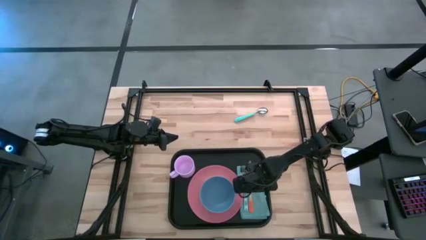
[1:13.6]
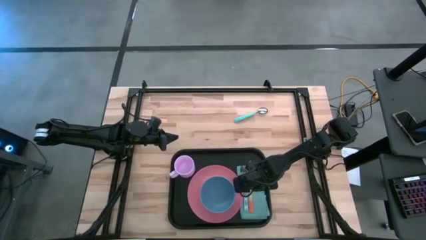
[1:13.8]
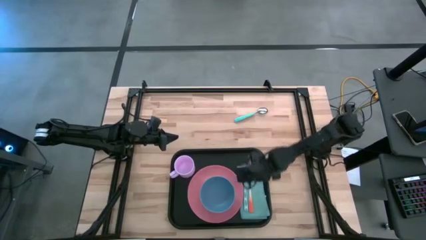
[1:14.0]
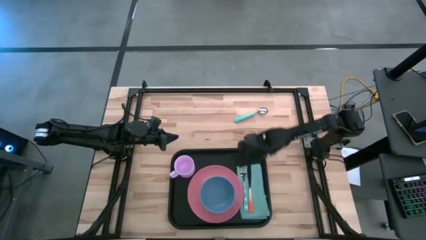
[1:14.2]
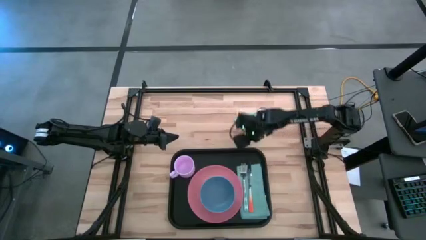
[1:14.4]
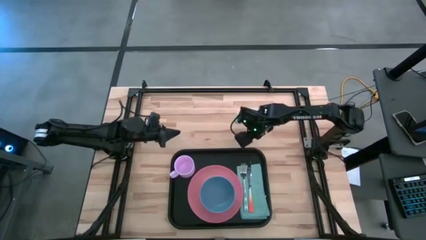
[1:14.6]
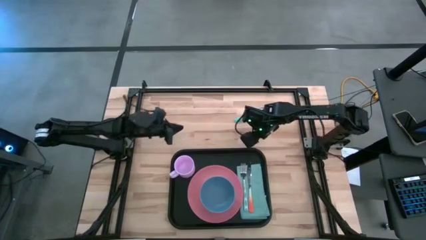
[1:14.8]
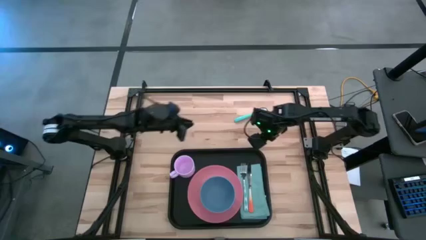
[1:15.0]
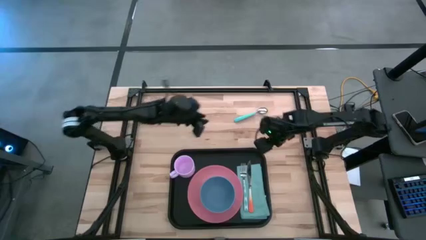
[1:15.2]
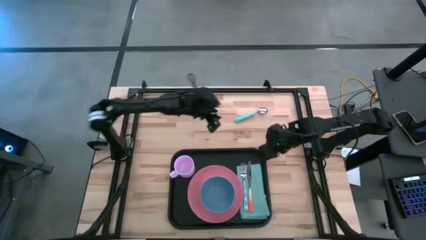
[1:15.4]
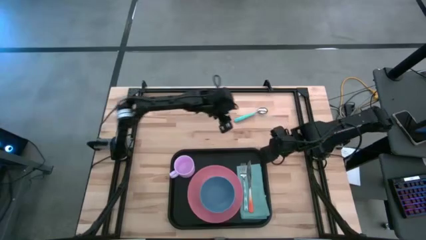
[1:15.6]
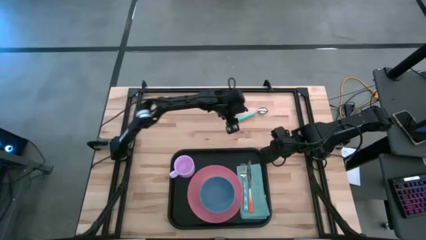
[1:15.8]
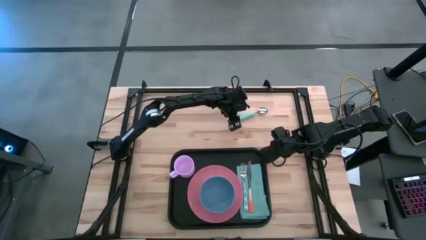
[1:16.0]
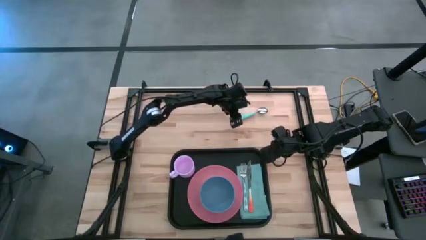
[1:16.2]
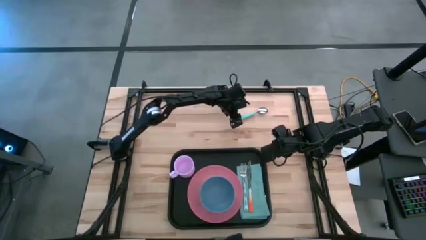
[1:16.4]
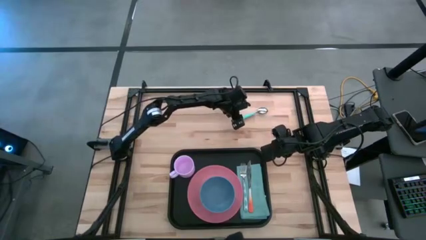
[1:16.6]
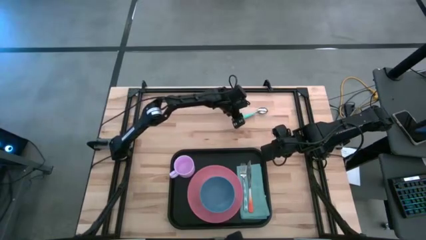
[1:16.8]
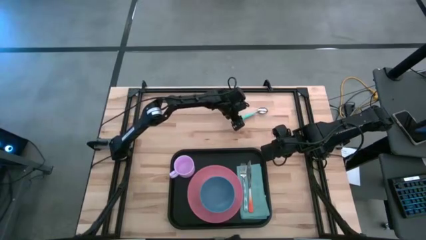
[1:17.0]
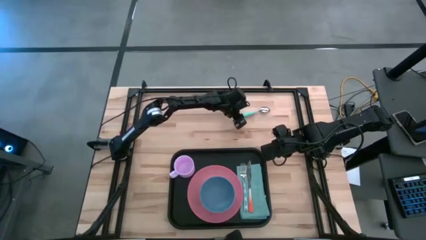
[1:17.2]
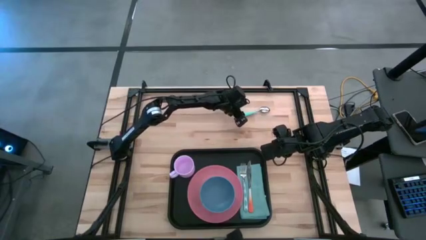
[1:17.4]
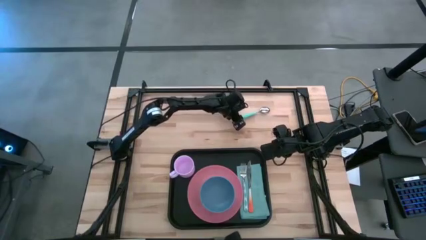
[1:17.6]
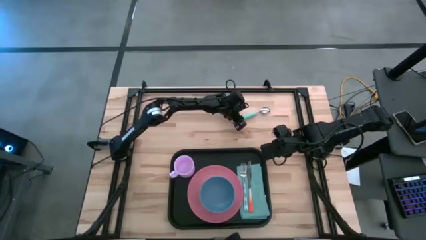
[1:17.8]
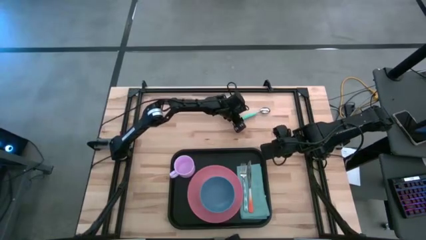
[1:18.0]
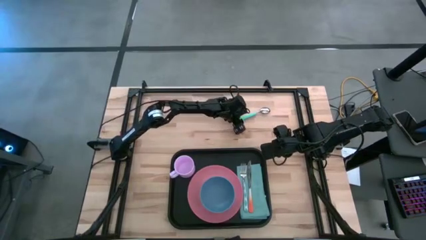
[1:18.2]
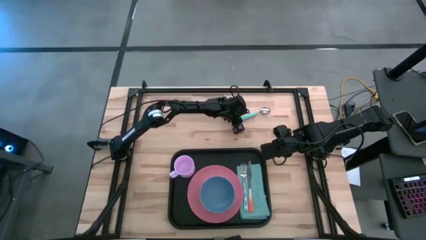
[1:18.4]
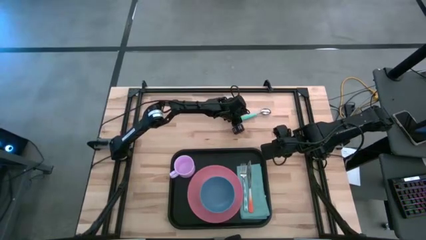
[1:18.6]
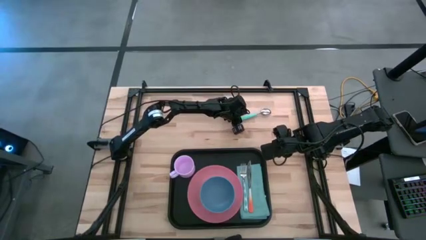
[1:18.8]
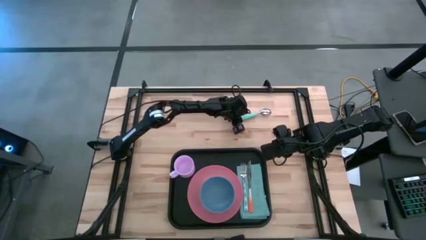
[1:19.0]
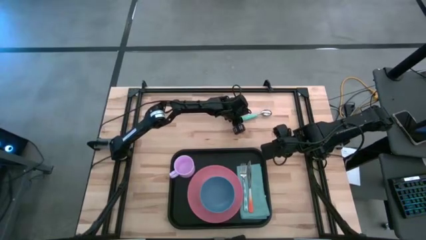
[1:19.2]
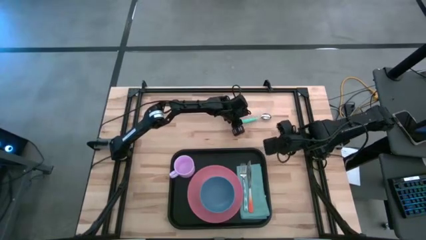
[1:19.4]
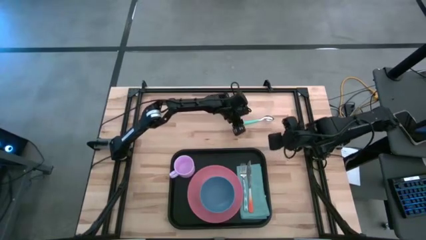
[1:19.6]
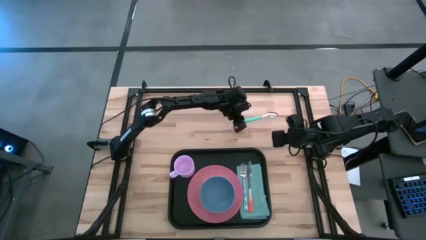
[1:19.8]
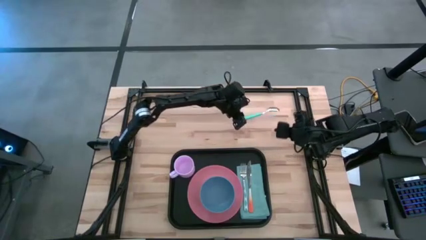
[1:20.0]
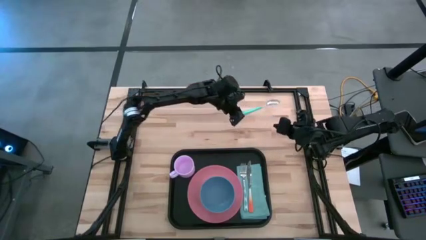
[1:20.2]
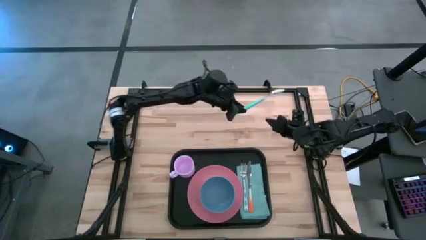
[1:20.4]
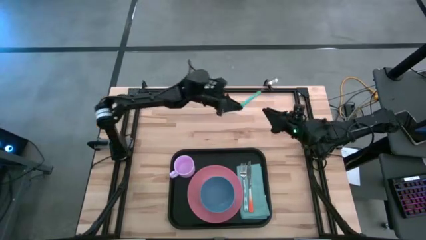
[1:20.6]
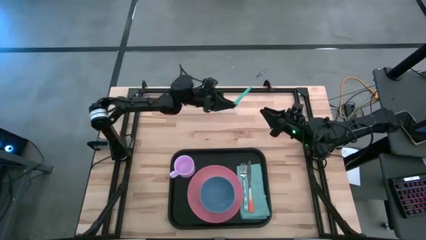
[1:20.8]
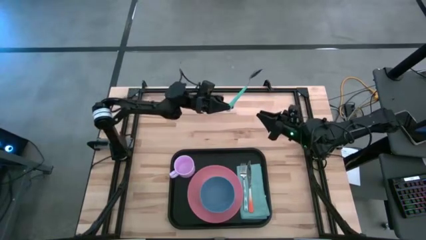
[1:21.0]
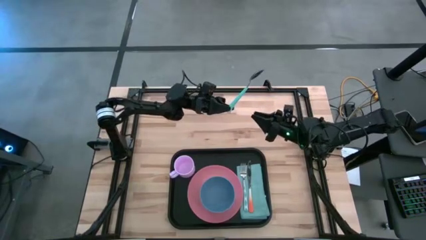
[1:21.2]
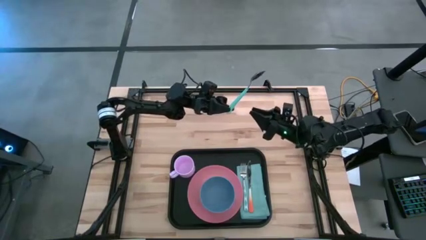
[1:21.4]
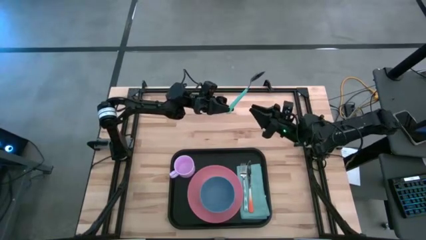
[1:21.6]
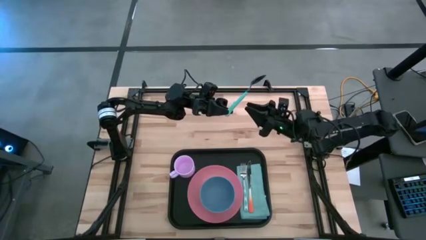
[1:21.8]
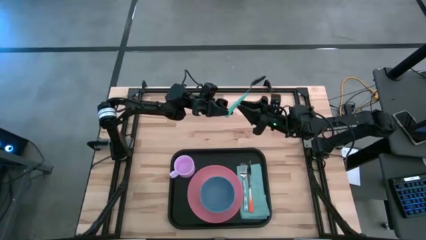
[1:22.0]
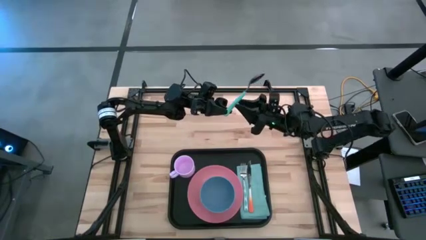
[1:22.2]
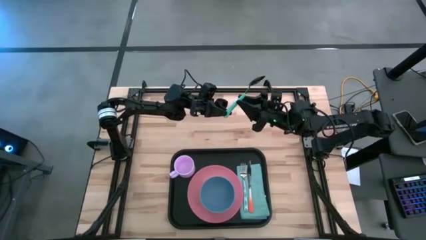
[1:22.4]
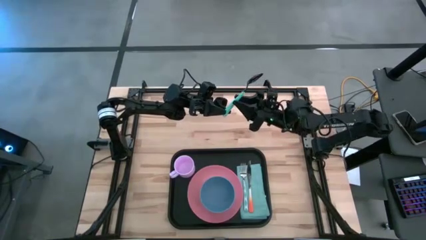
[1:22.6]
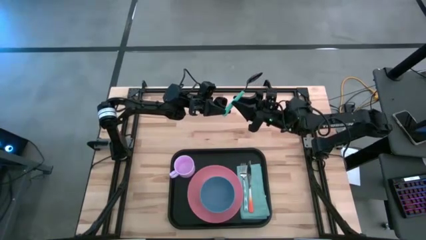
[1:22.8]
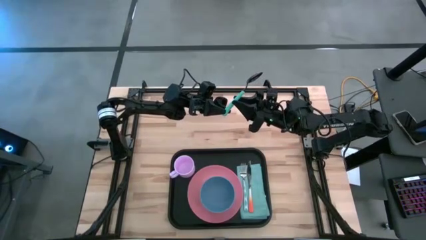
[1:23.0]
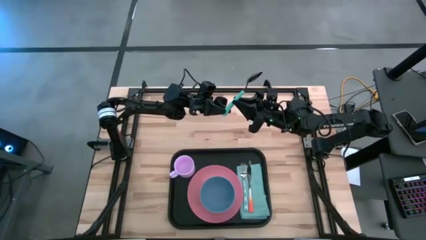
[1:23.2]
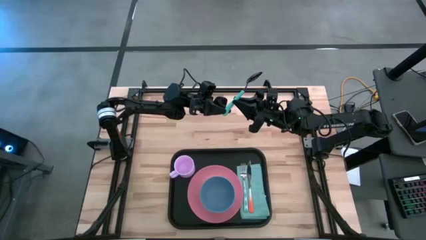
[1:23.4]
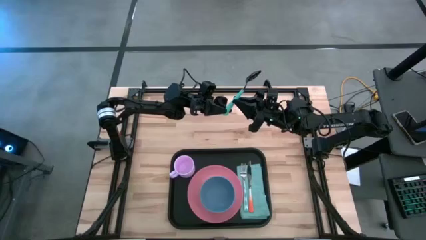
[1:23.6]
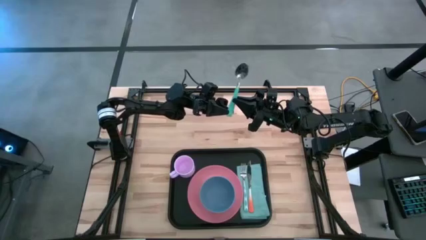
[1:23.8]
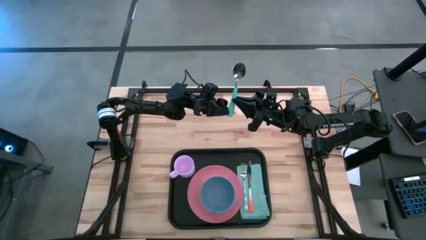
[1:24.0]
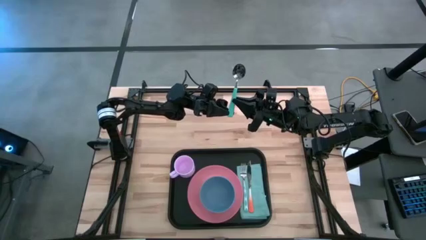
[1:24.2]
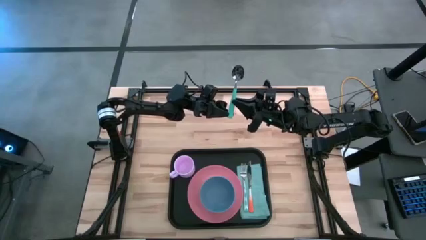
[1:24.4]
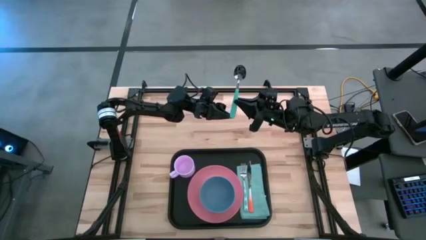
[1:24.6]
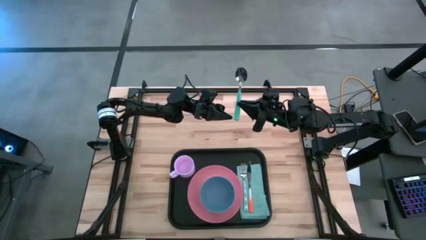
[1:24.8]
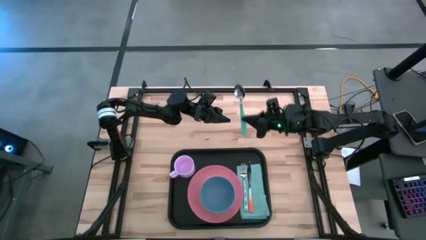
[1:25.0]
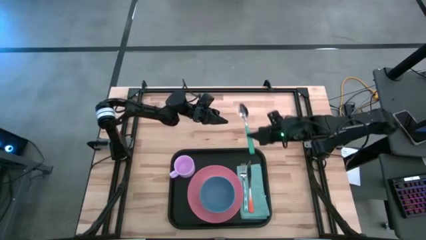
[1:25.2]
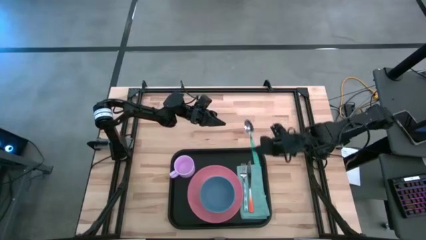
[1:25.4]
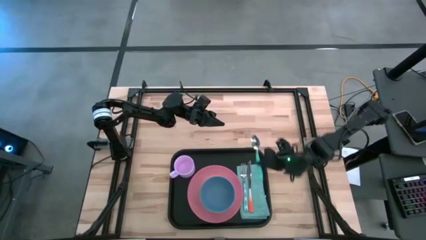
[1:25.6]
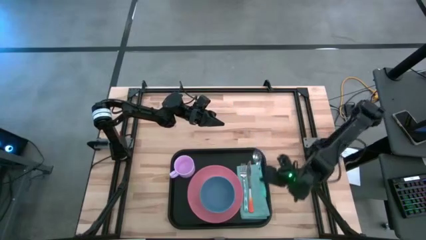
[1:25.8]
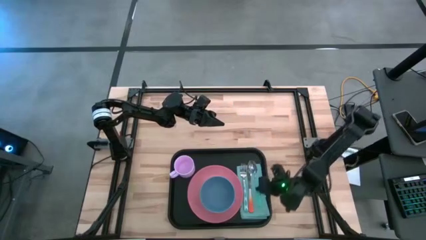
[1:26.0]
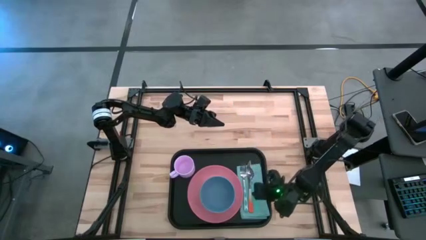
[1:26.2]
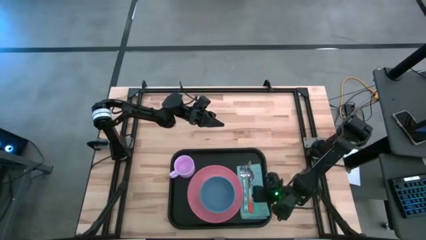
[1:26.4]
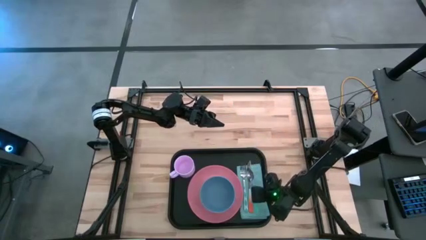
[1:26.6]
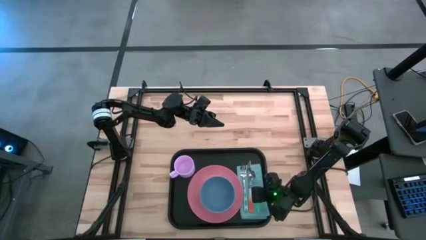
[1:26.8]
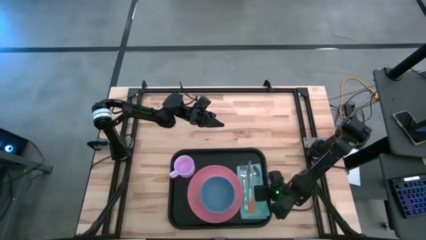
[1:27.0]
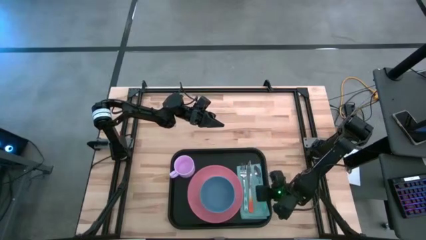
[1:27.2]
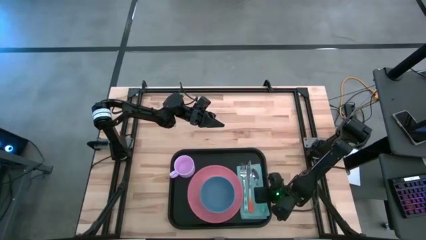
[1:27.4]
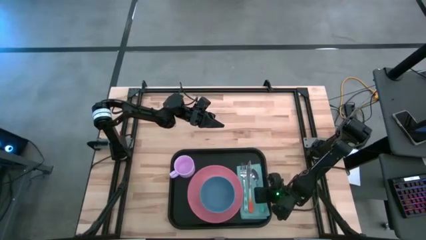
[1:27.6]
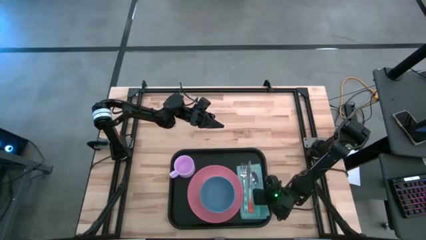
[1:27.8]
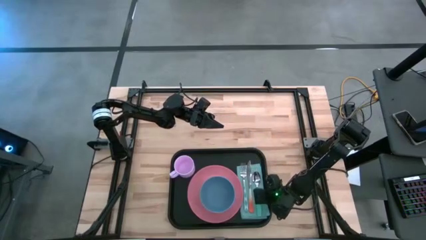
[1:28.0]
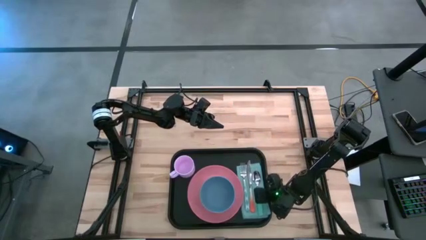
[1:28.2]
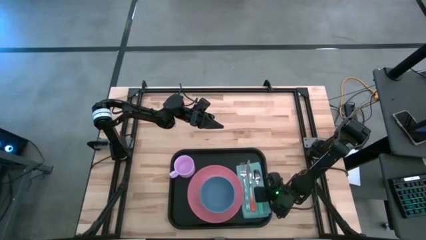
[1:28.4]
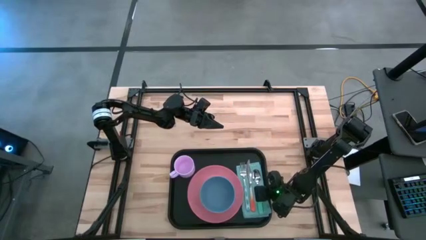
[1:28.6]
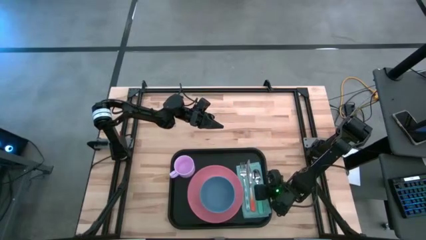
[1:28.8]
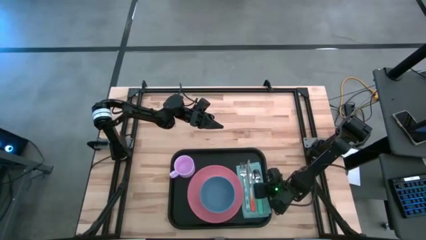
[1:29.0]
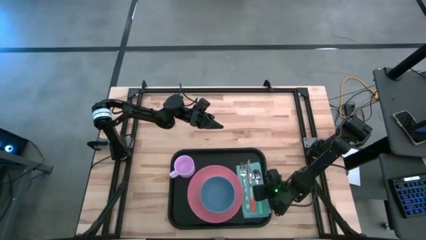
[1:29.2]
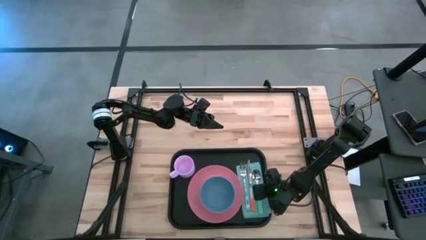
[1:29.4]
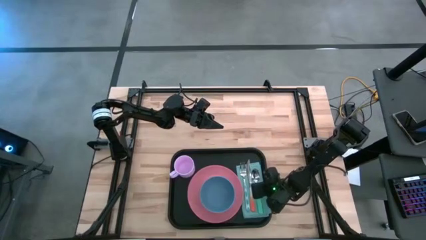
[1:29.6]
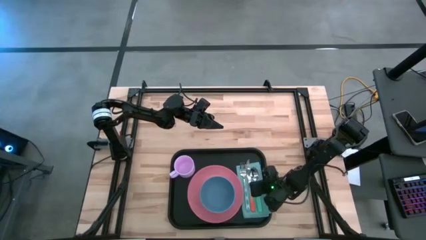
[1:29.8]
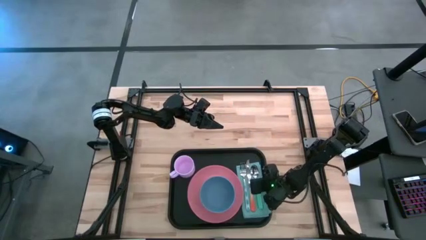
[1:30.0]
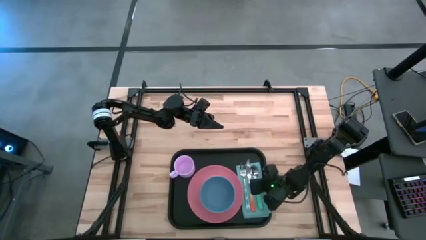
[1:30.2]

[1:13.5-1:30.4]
Task: Set up tray
Put the blue spoon on the blue napkin to the right of the orange knife
